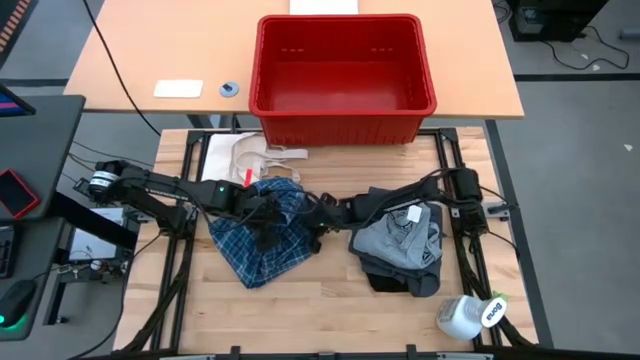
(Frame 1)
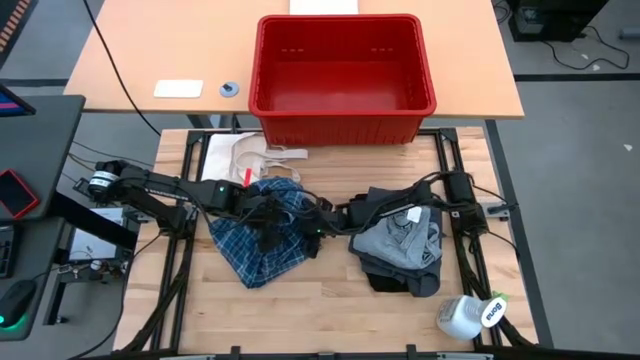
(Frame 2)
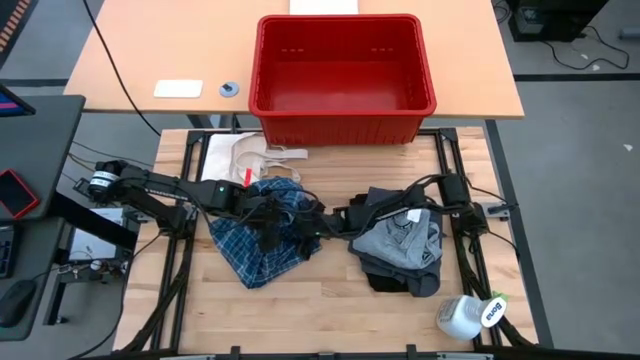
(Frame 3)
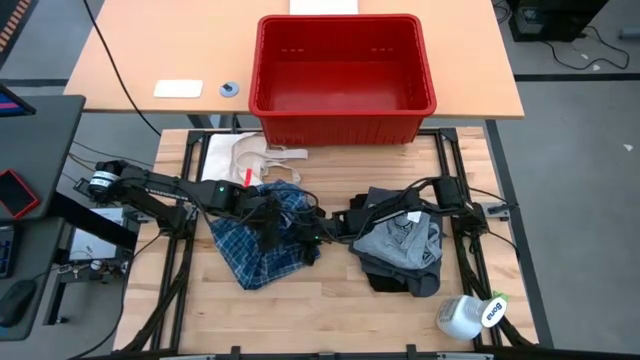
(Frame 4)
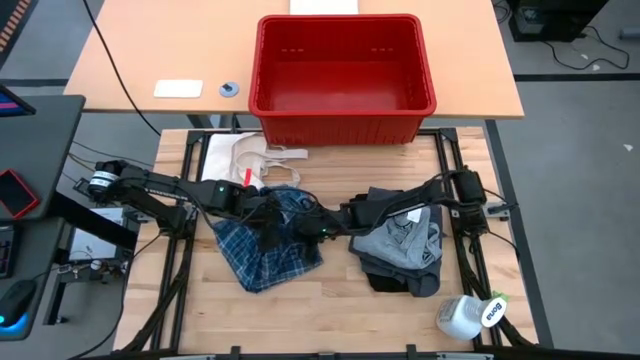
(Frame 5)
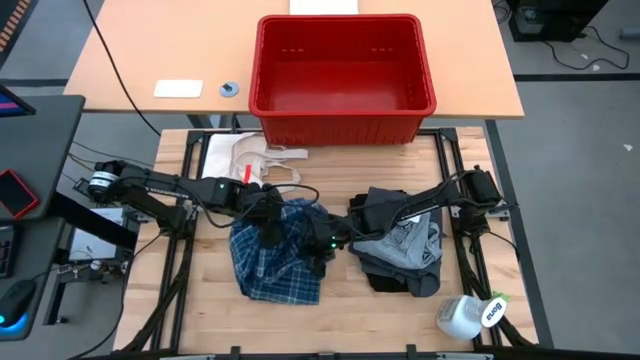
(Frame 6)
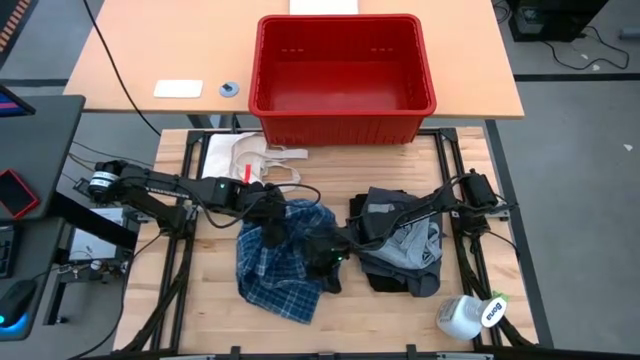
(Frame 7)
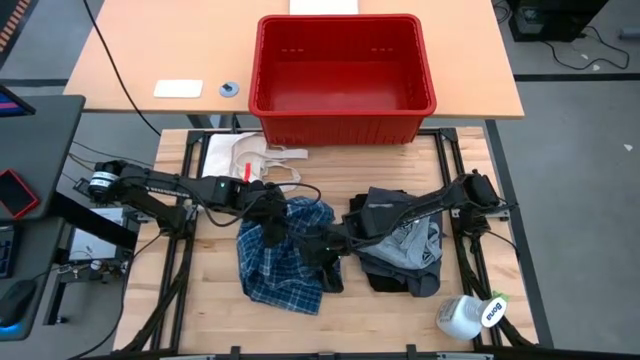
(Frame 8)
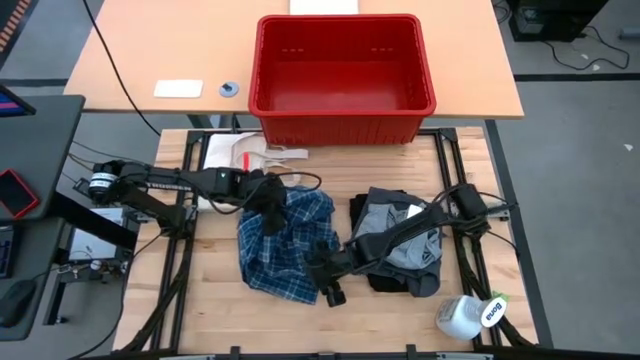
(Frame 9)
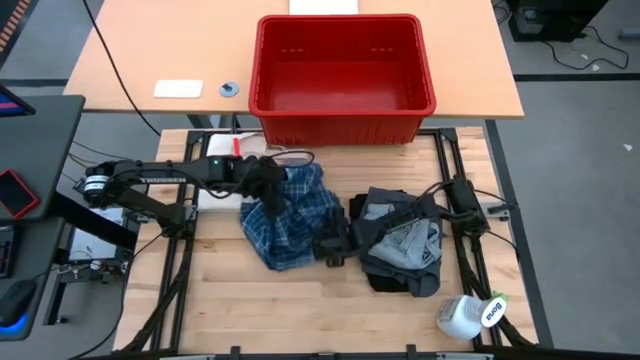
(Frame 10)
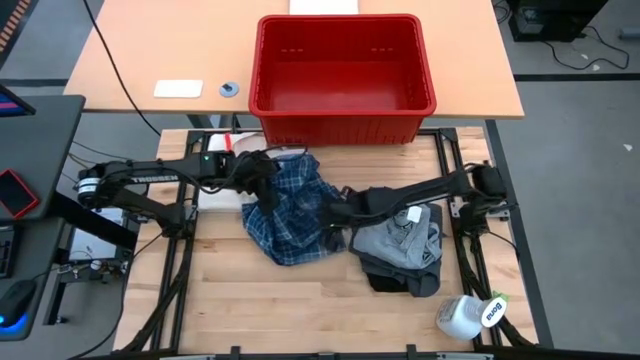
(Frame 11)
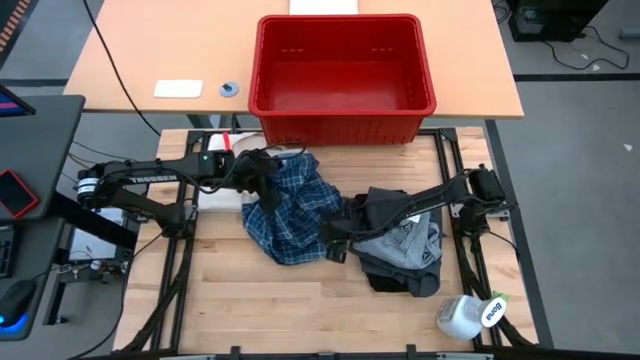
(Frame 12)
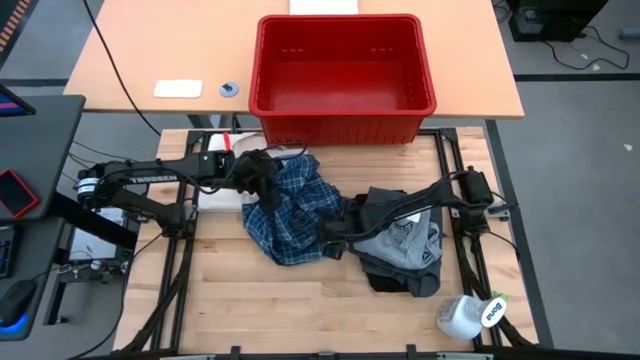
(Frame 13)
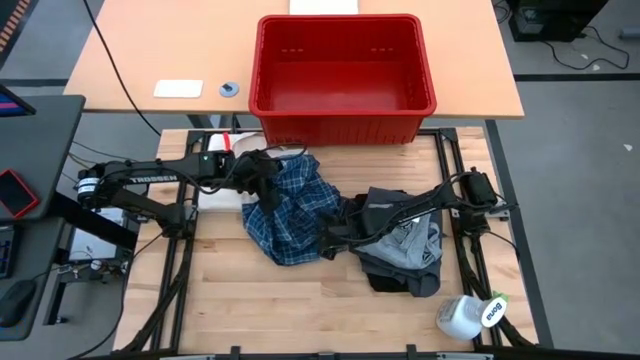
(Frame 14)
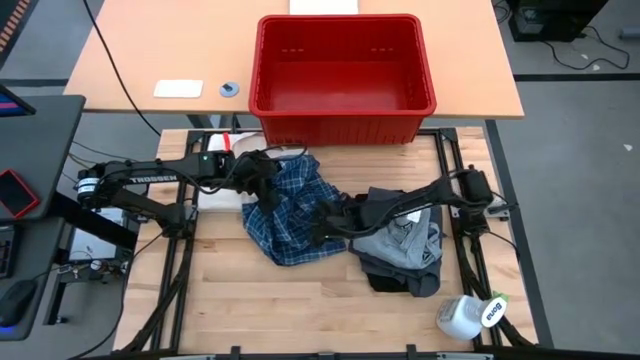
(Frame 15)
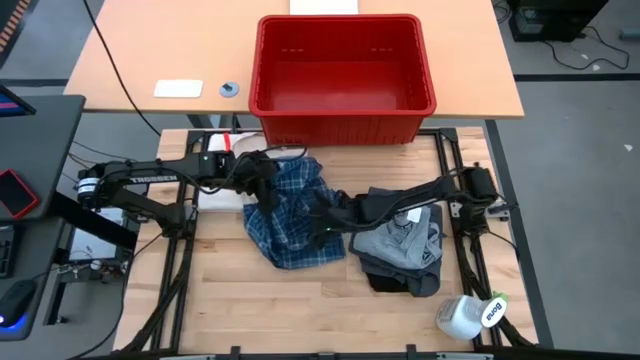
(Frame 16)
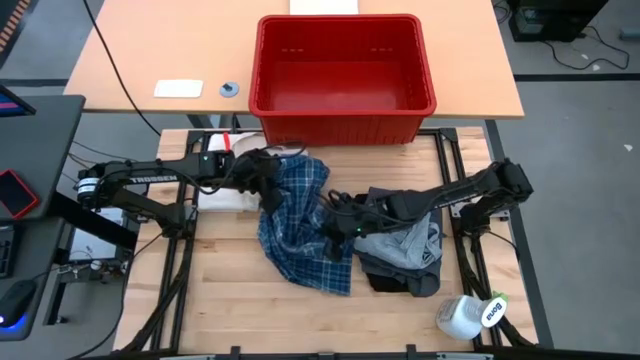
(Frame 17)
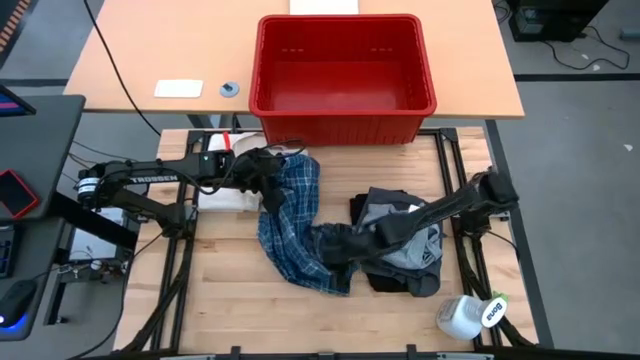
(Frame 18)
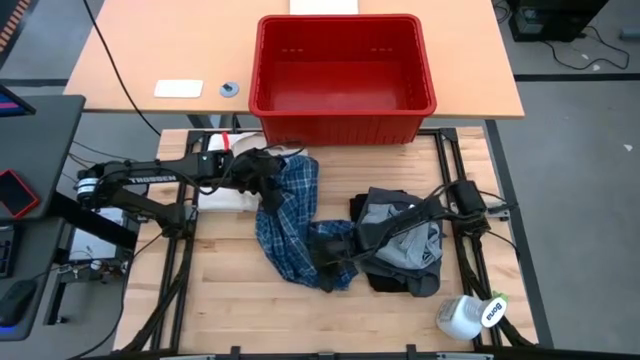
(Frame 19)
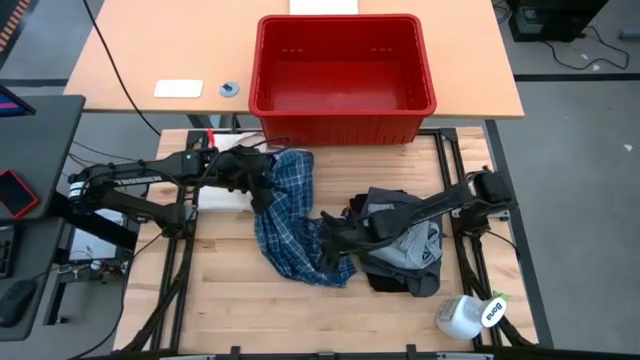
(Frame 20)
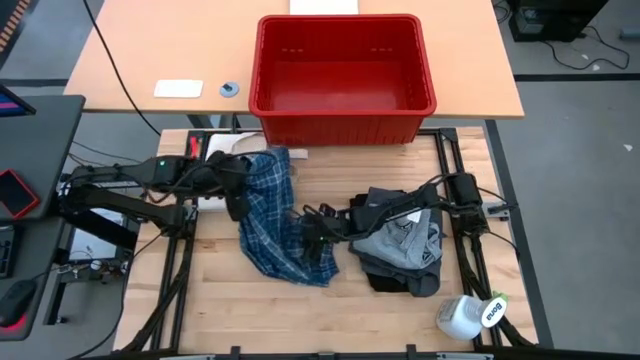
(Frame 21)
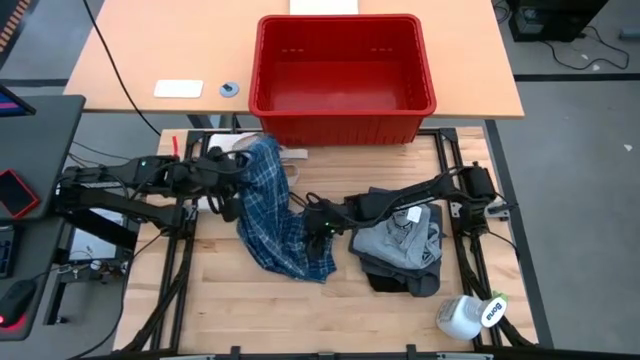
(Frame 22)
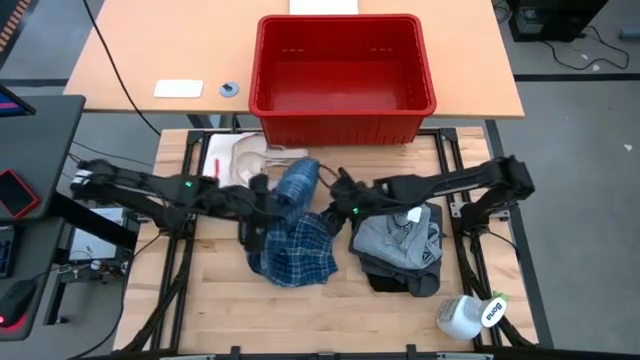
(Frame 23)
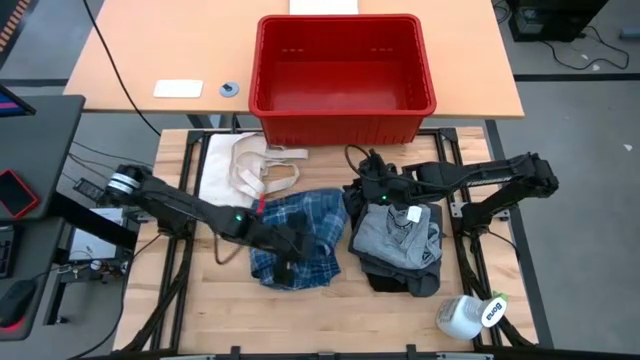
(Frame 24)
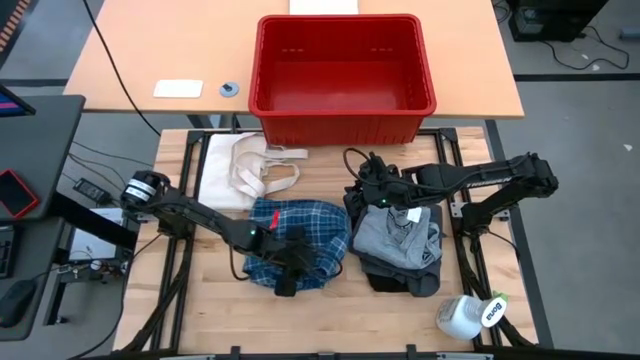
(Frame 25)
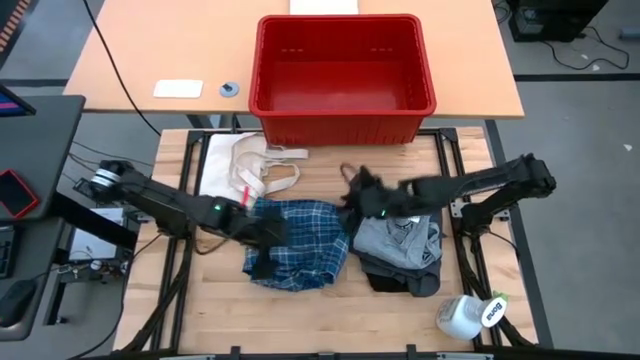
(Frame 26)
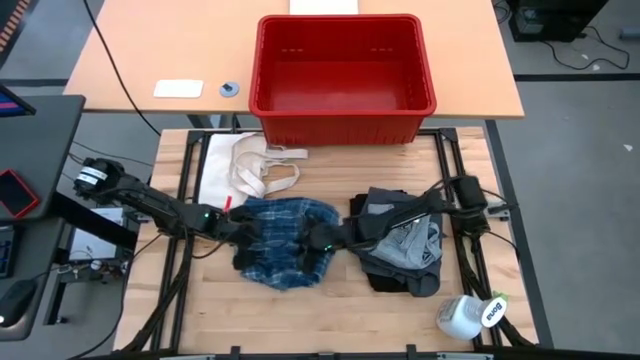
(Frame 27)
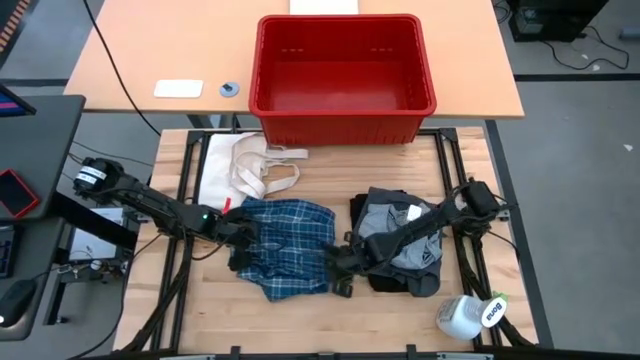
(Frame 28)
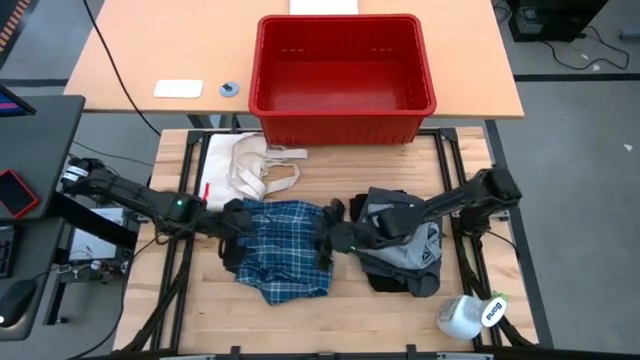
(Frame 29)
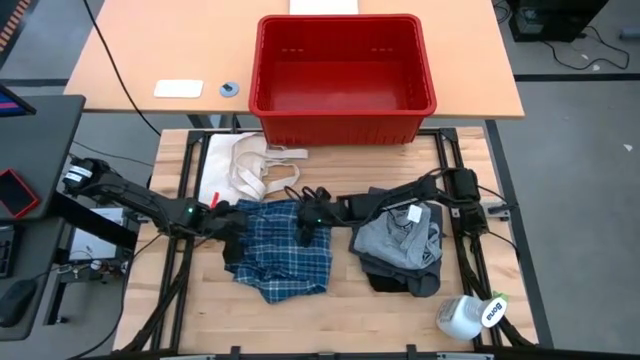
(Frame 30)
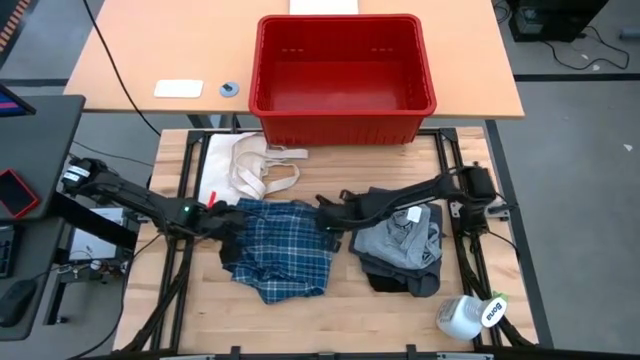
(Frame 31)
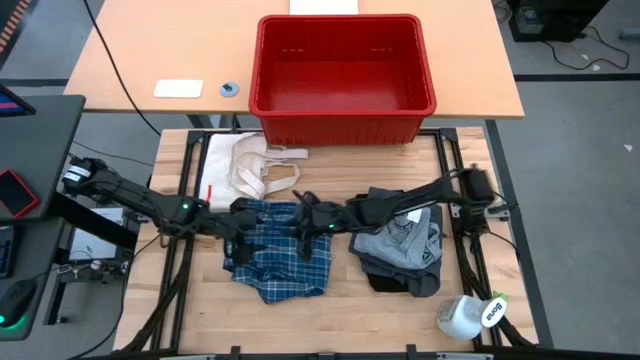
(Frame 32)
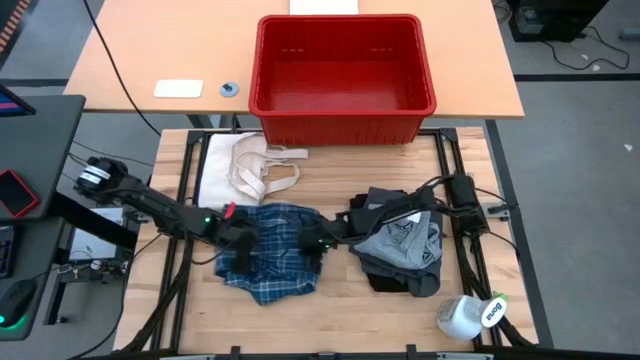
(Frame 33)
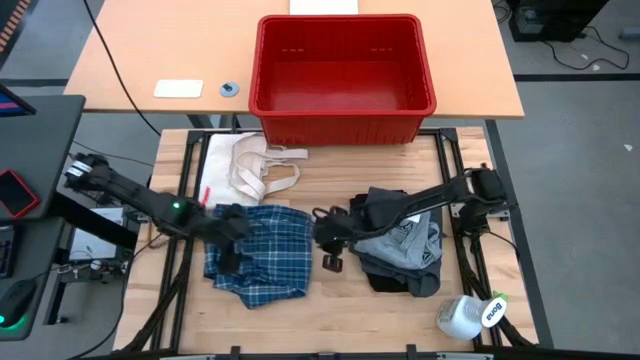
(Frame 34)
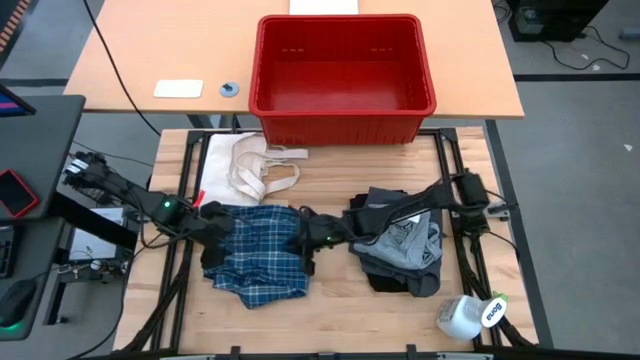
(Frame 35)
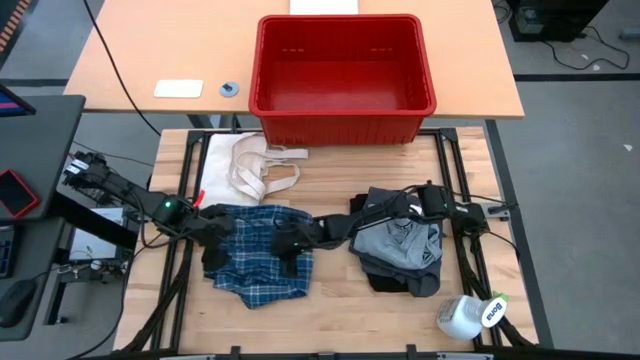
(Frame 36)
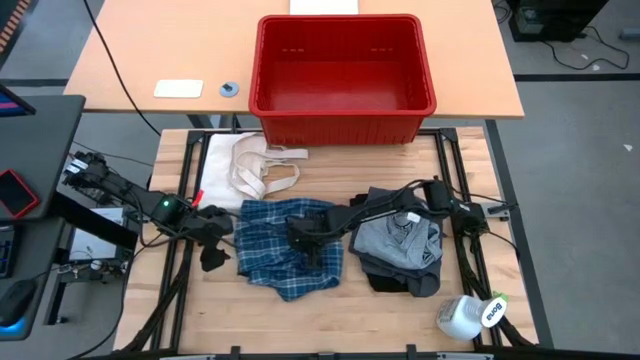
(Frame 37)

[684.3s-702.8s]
Task: Fold Laundry from Bin
Fold the blue checkered pants

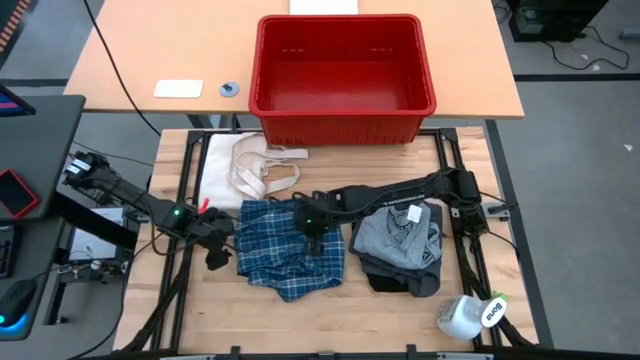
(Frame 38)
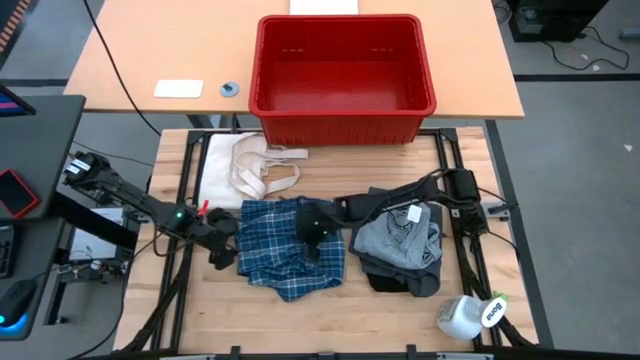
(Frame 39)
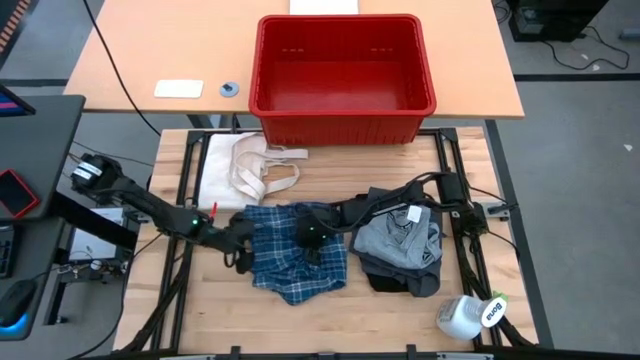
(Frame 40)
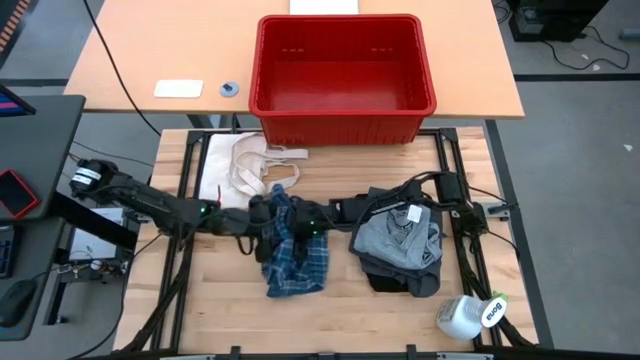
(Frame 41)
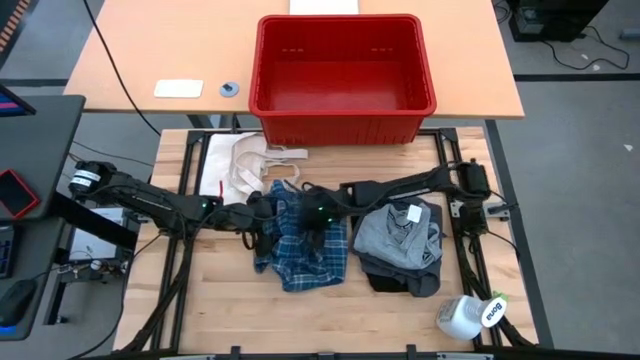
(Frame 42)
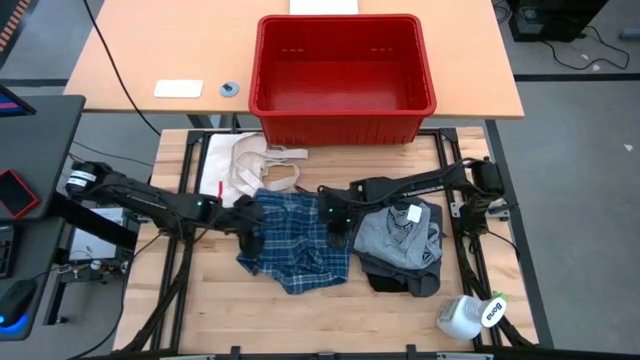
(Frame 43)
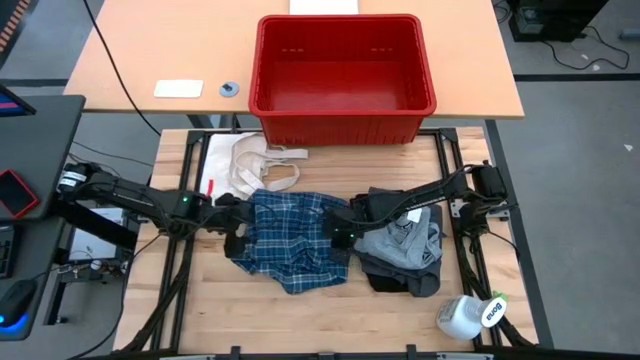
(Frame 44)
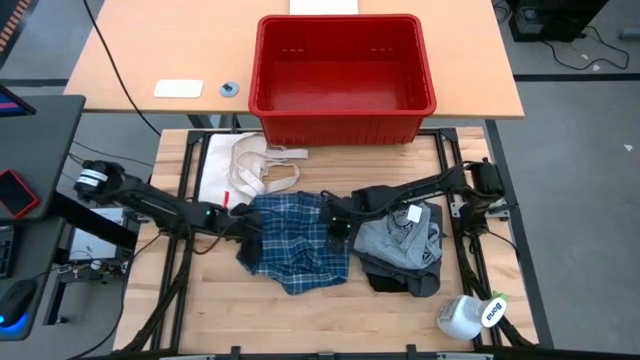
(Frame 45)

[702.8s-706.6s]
Stack the folded blue checkered pants on top of the folded gray shirt
